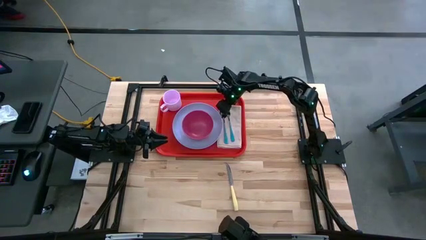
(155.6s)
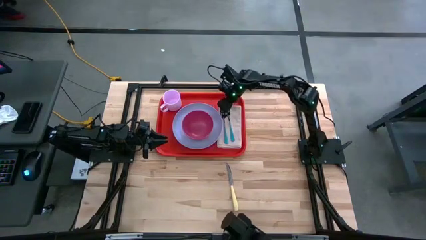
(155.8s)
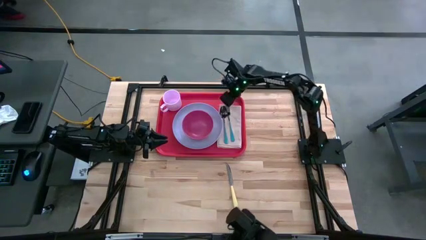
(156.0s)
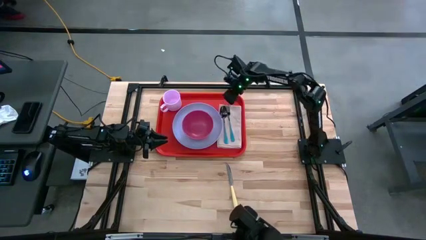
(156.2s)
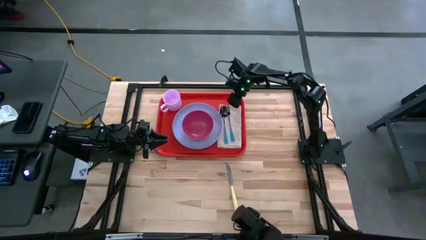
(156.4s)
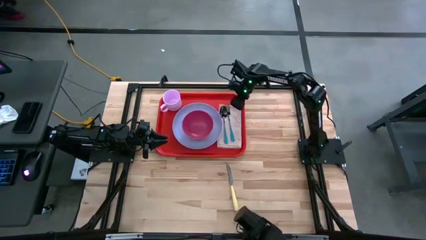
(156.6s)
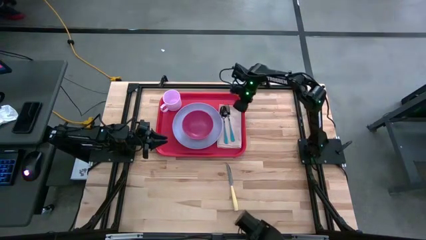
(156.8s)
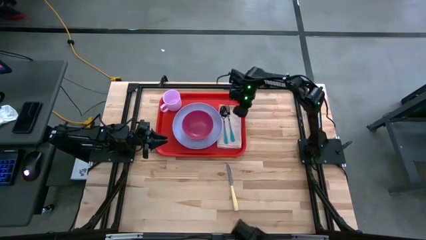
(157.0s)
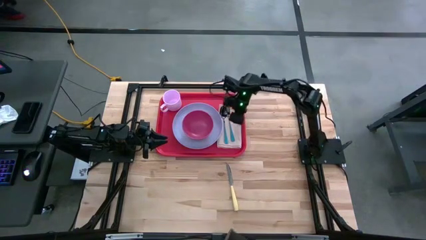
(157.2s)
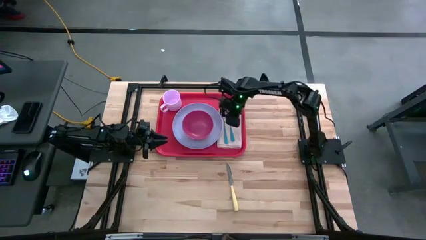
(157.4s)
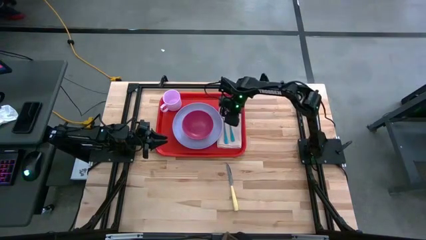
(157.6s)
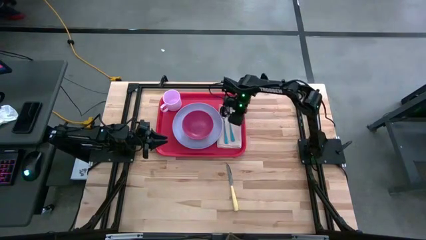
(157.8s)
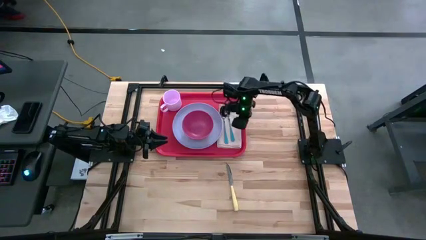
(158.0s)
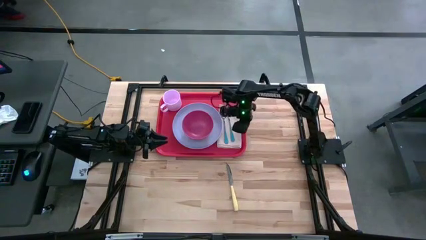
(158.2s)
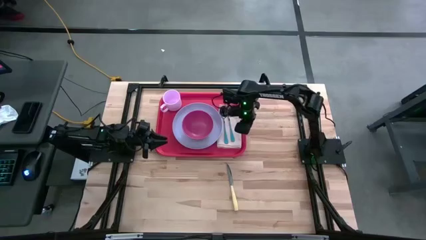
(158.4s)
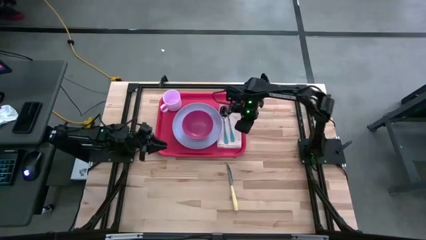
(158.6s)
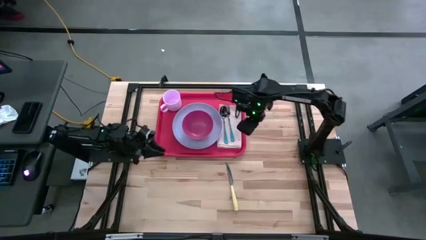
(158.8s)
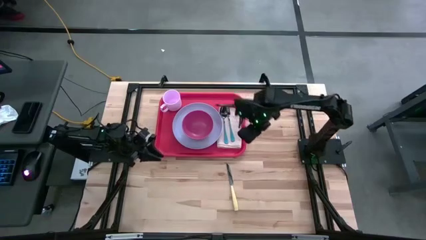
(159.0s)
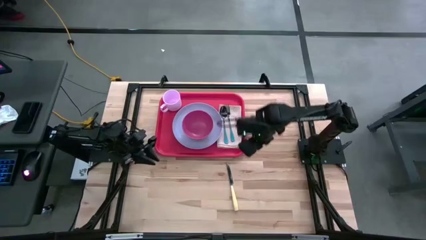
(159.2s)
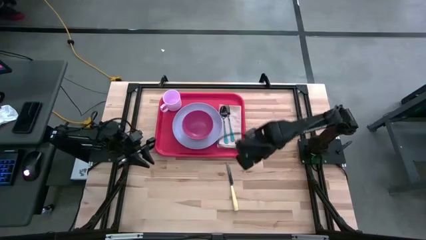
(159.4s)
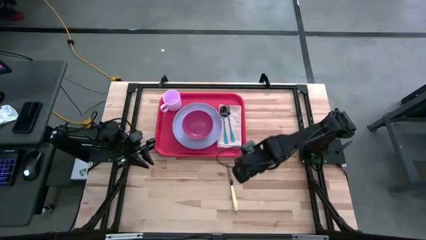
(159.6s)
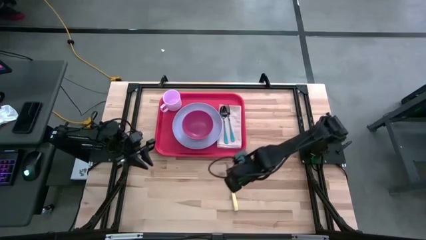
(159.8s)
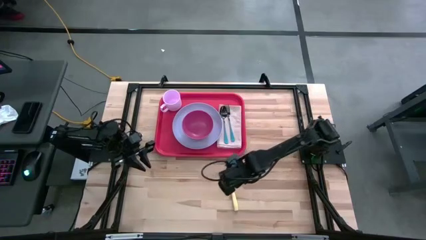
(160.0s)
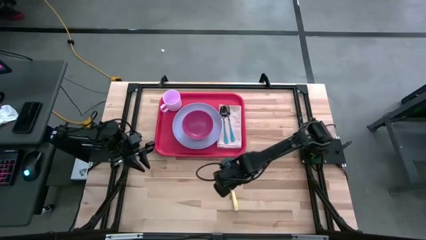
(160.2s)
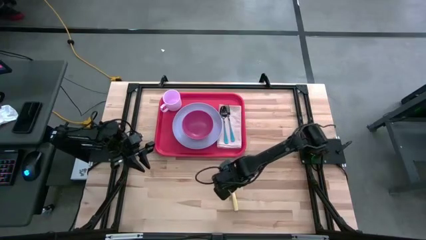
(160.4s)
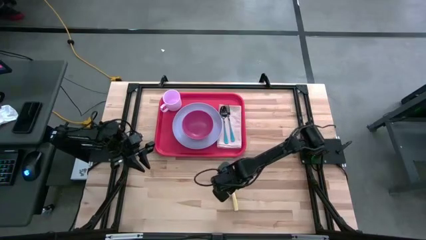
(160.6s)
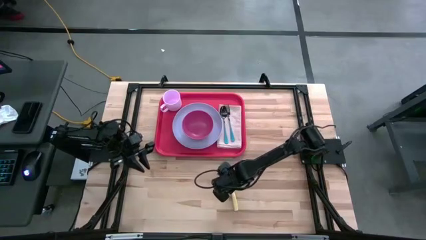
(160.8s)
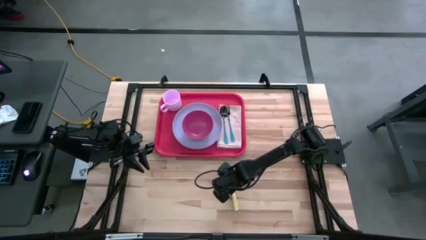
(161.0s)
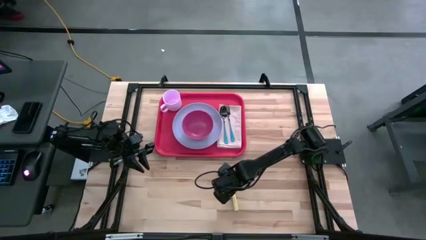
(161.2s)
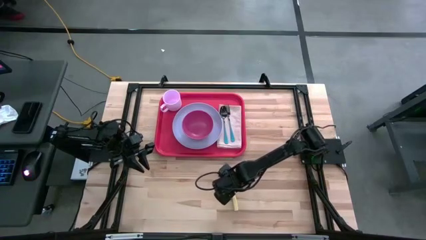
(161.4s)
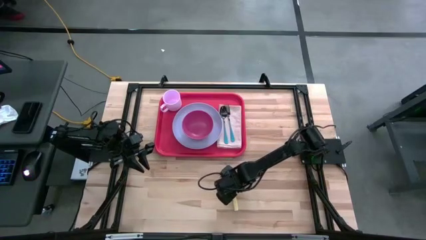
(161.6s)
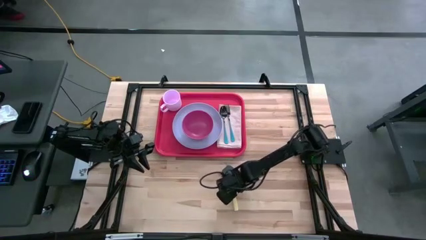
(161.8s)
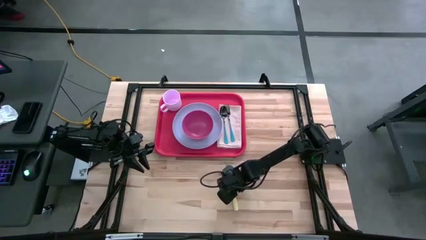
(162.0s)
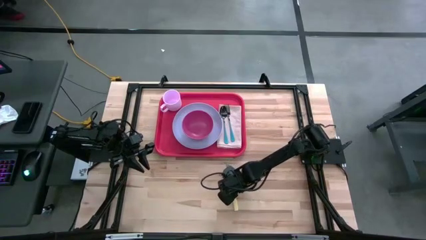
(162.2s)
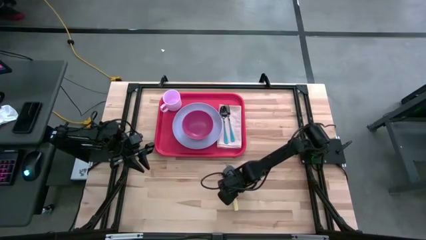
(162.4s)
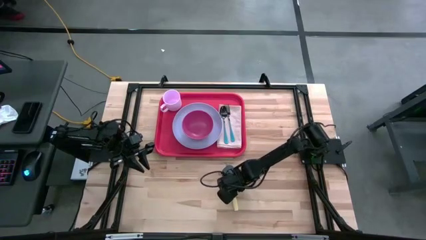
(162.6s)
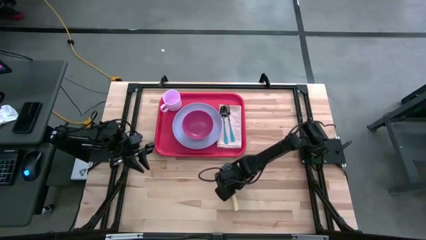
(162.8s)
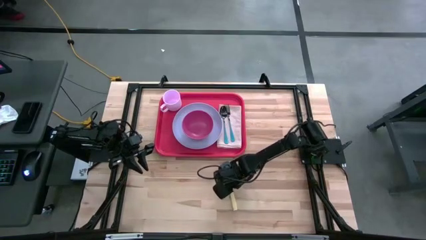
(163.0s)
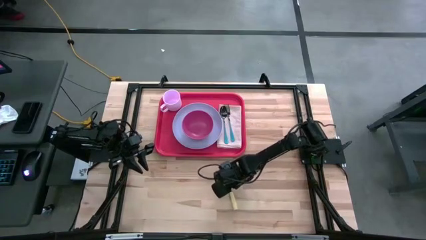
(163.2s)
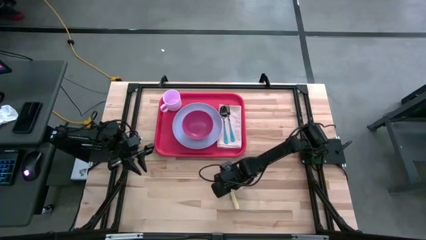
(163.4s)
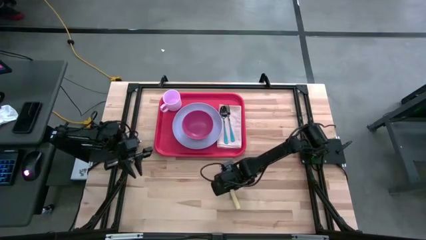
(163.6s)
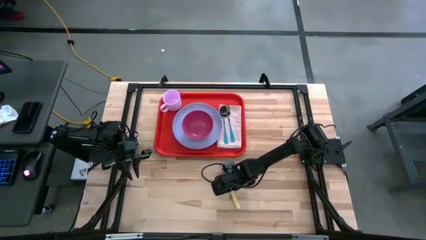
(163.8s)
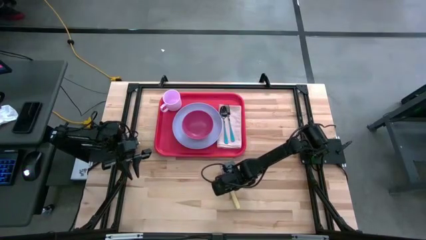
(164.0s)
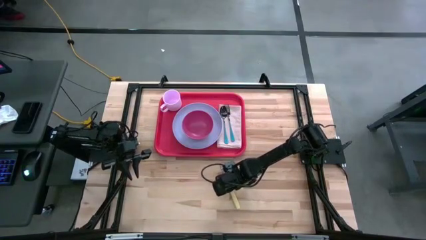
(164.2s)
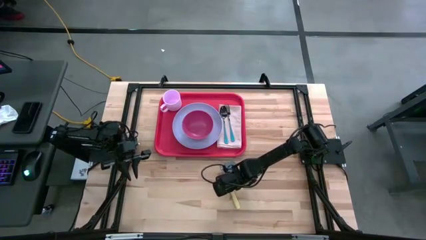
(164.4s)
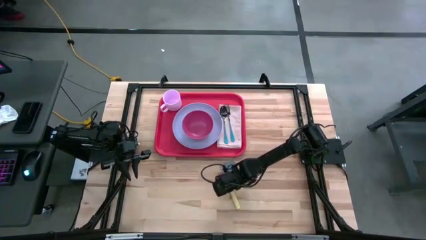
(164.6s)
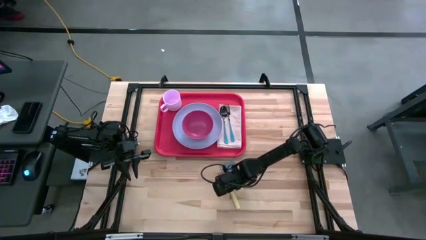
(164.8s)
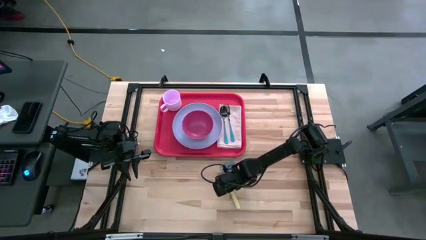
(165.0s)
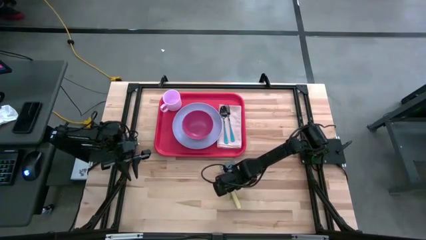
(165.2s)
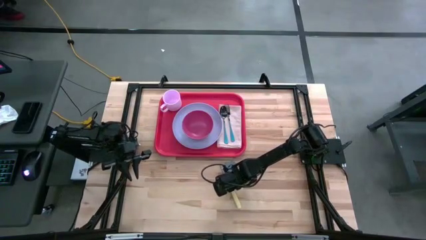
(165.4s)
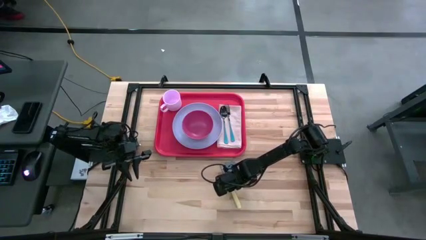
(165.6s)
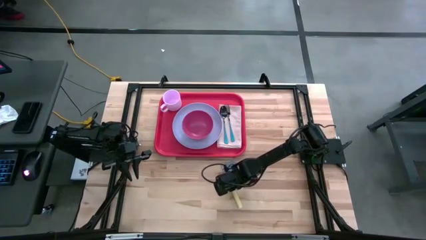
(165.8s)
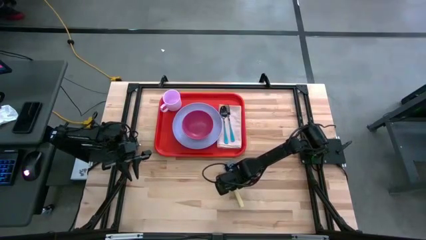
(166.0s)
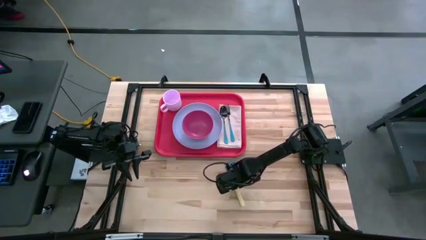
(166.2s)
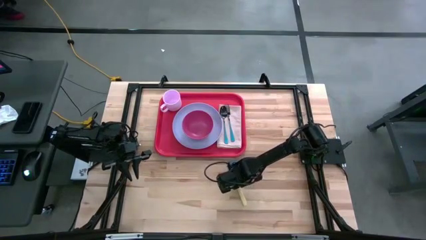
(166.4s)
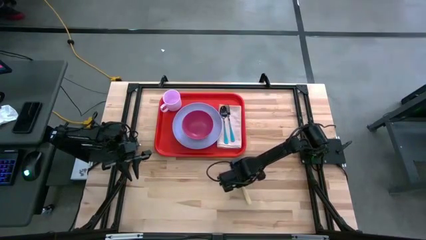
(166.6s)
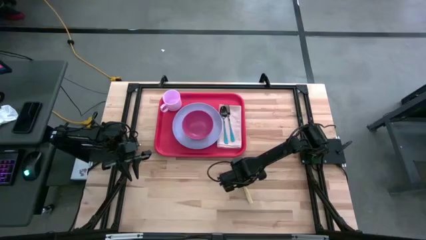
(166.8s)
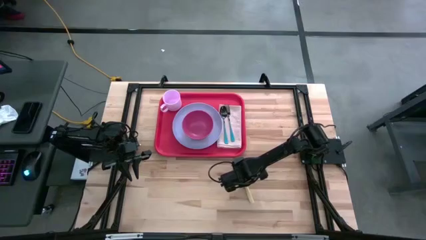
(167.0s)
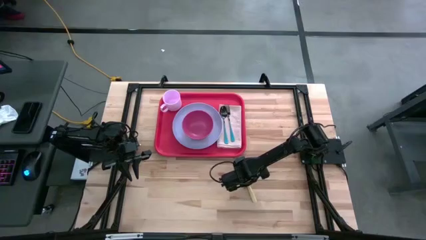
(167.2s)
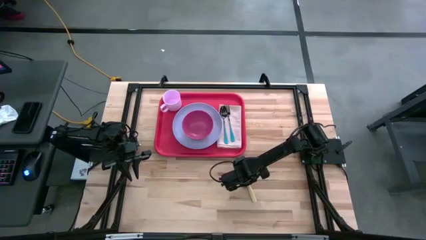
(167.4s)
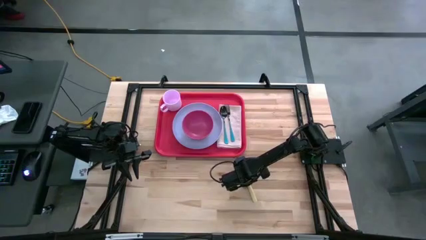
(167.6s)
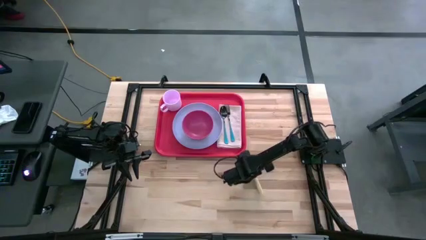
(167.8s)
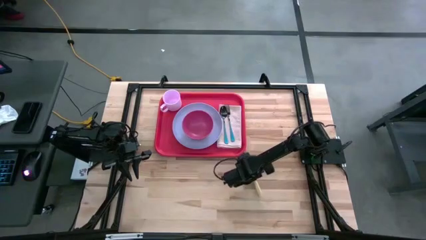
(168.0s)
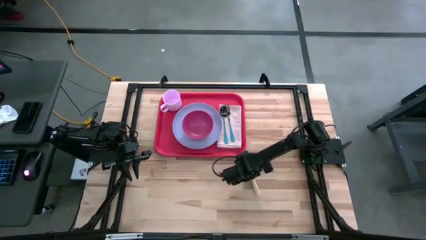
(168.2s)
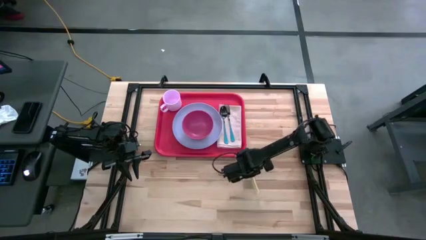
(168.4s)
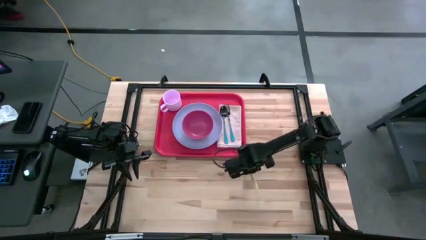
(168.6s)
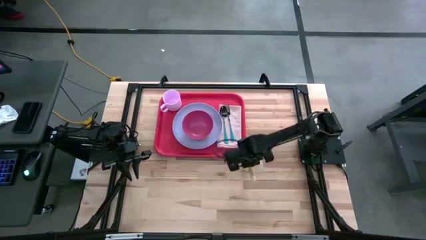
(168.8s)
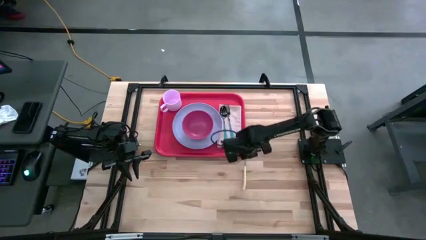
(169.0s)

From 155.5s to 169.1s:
Task: Set up tray
Put the yellow knife on the white table napkin to the right of the blue fork
